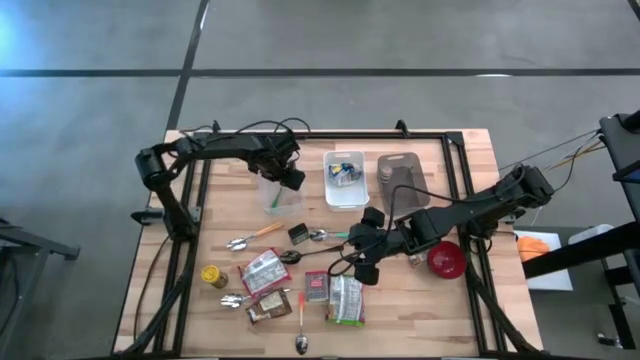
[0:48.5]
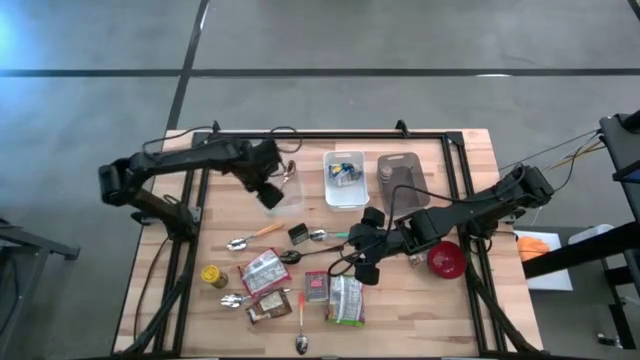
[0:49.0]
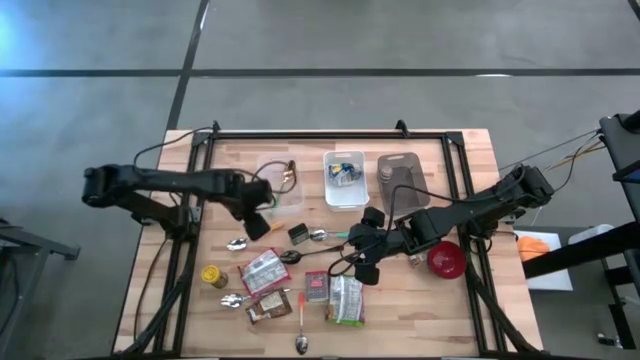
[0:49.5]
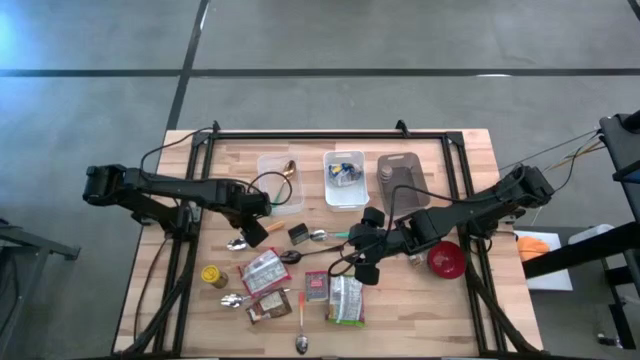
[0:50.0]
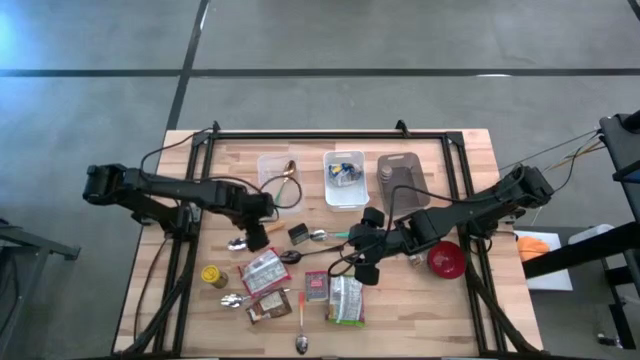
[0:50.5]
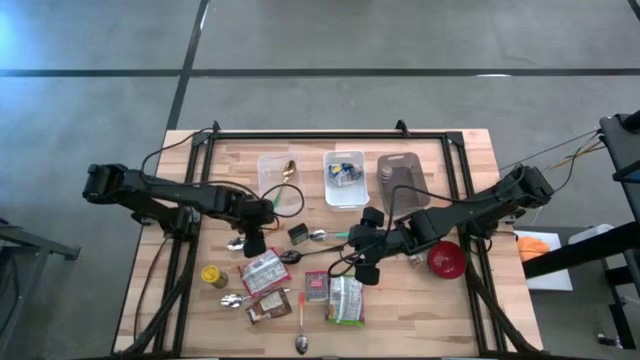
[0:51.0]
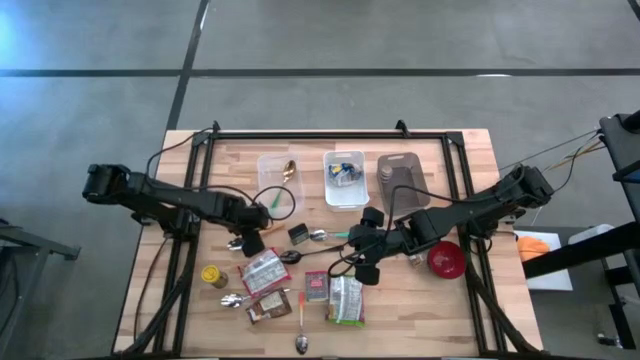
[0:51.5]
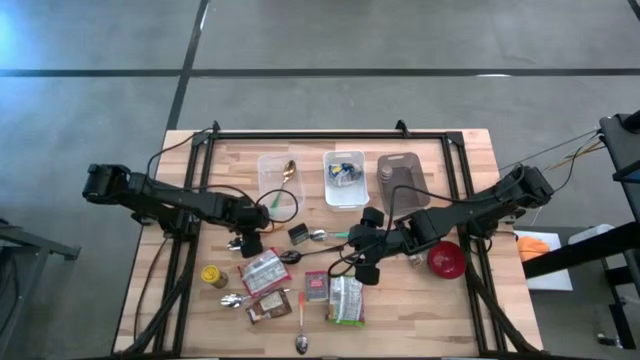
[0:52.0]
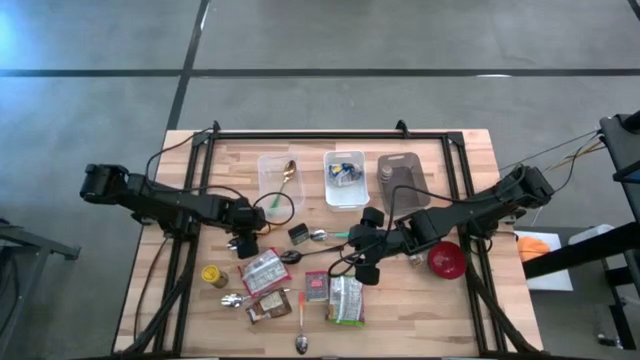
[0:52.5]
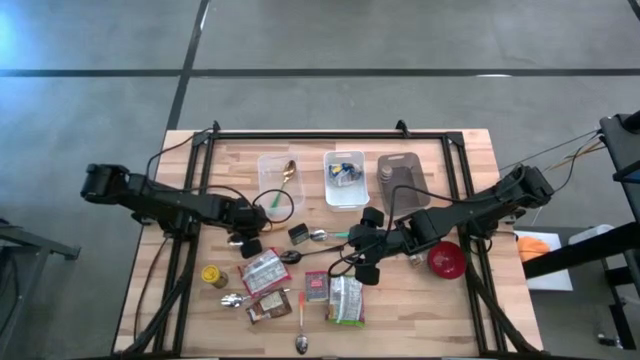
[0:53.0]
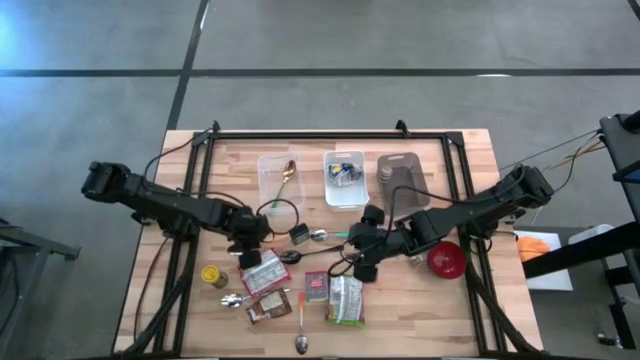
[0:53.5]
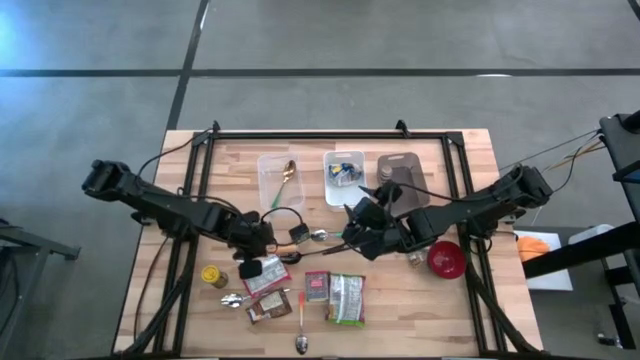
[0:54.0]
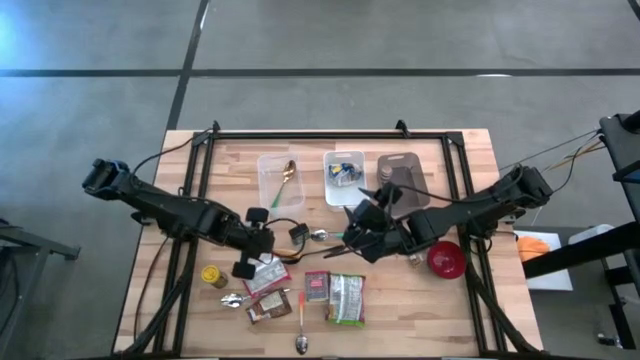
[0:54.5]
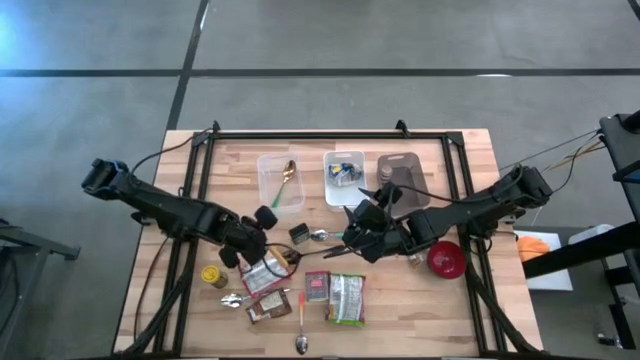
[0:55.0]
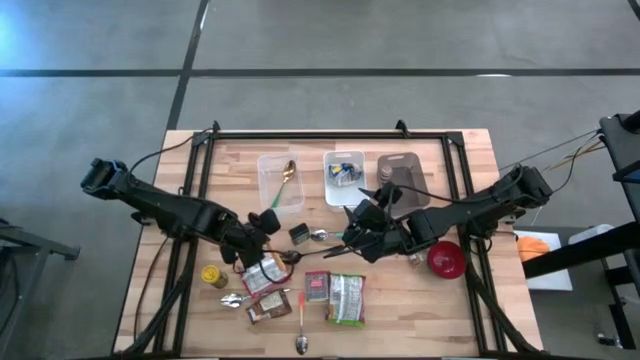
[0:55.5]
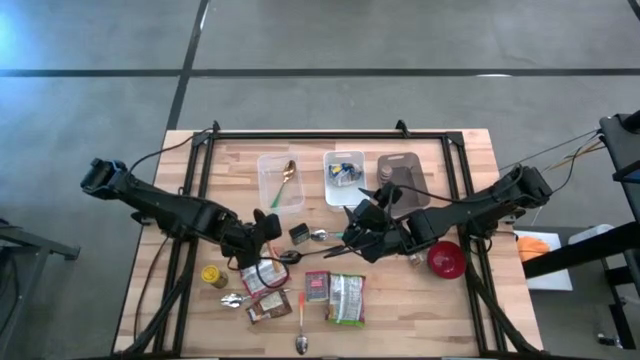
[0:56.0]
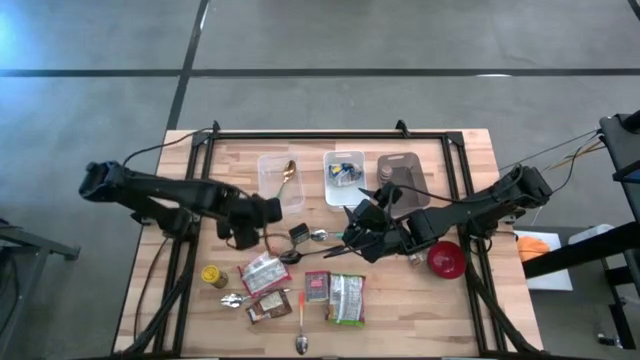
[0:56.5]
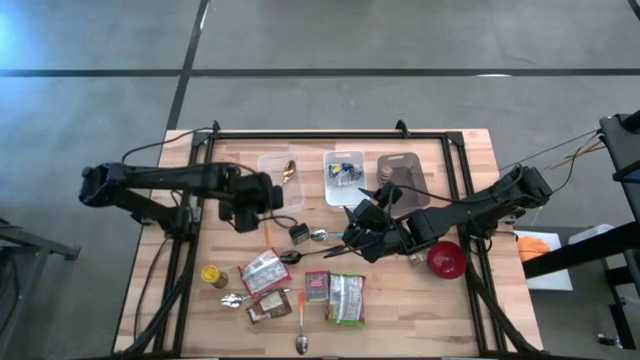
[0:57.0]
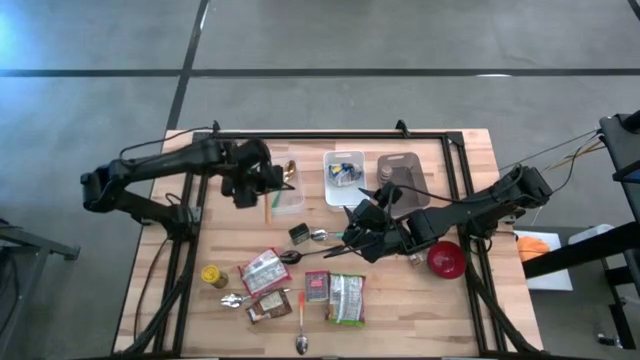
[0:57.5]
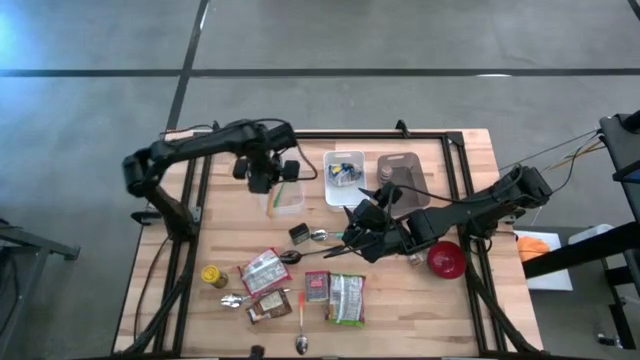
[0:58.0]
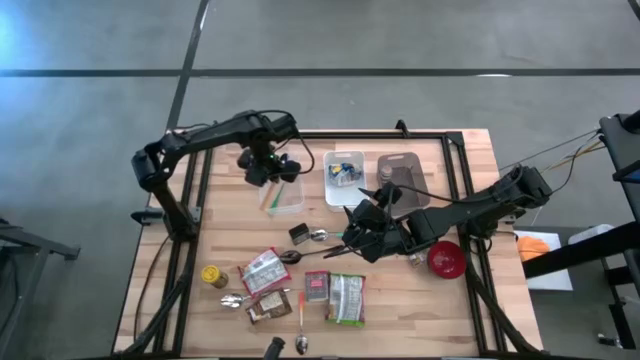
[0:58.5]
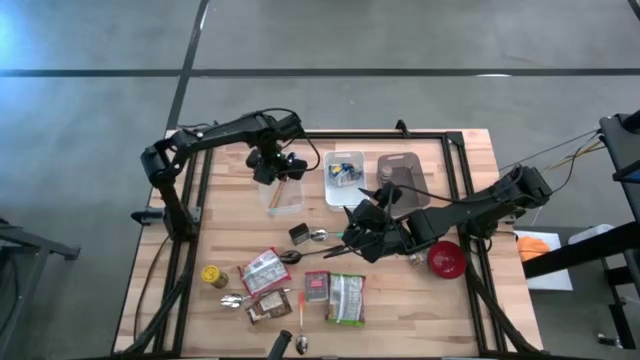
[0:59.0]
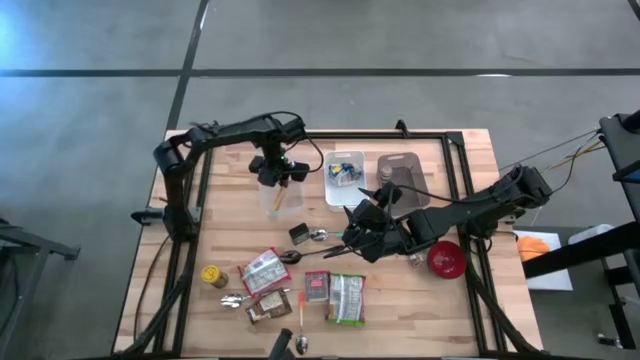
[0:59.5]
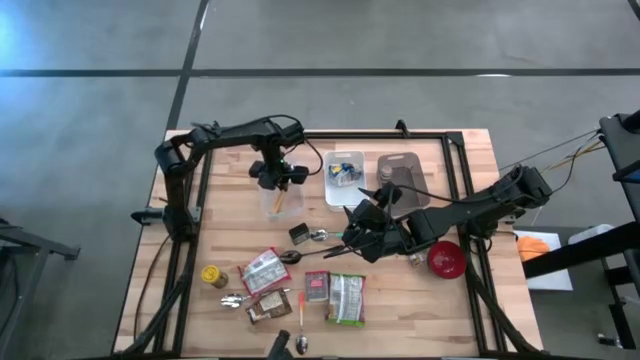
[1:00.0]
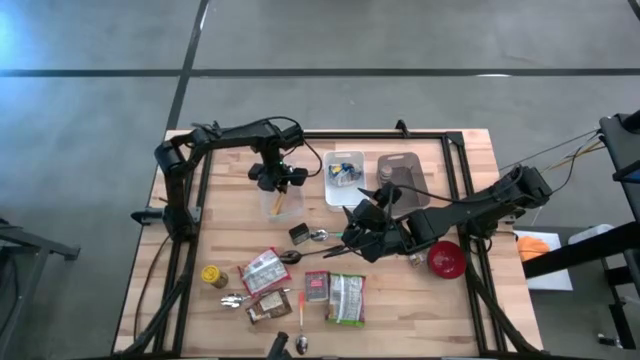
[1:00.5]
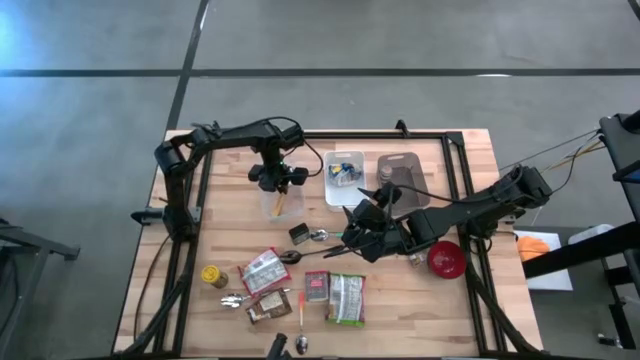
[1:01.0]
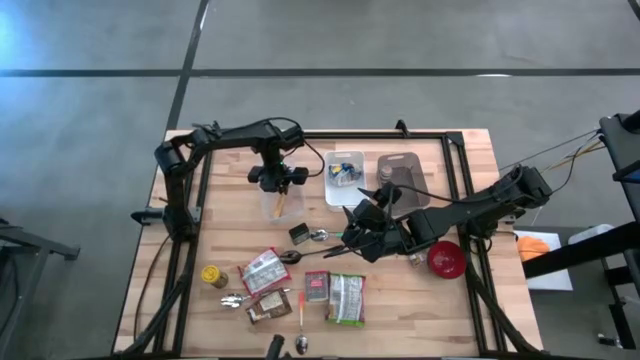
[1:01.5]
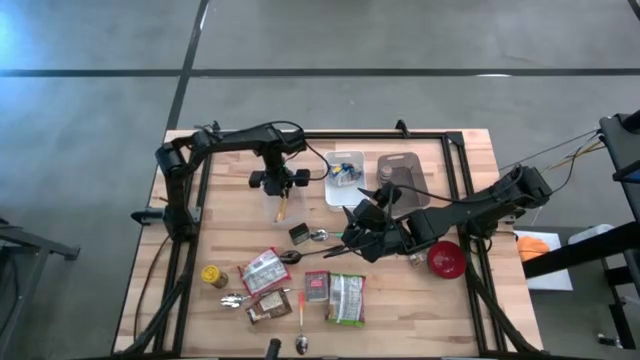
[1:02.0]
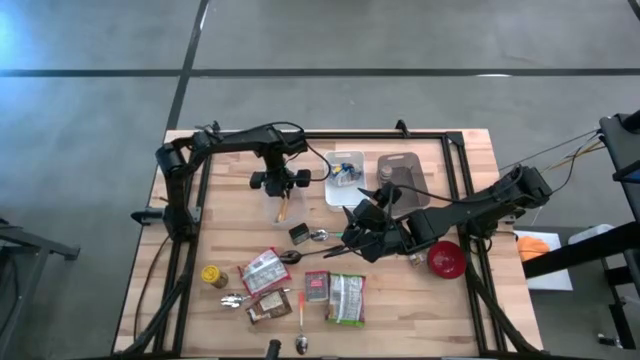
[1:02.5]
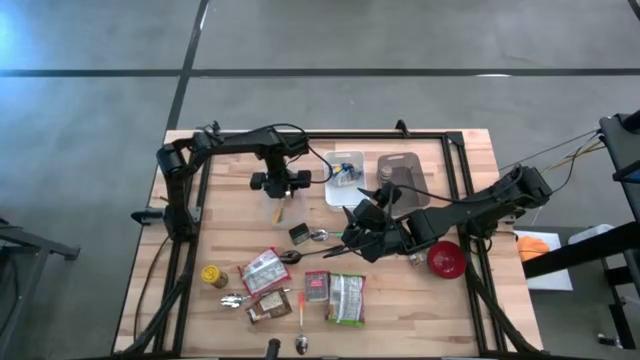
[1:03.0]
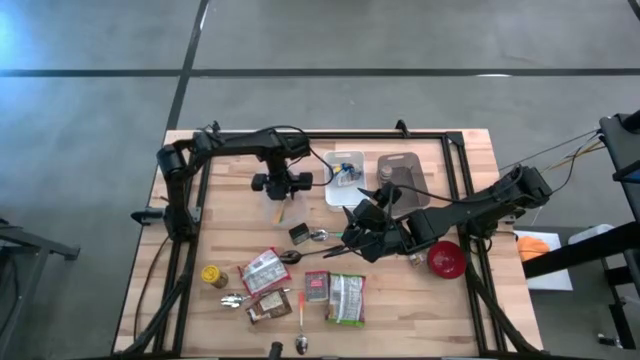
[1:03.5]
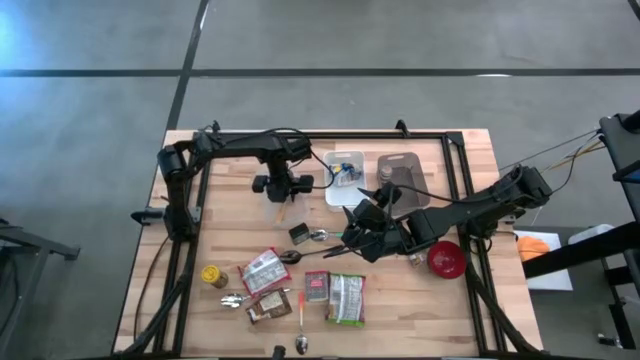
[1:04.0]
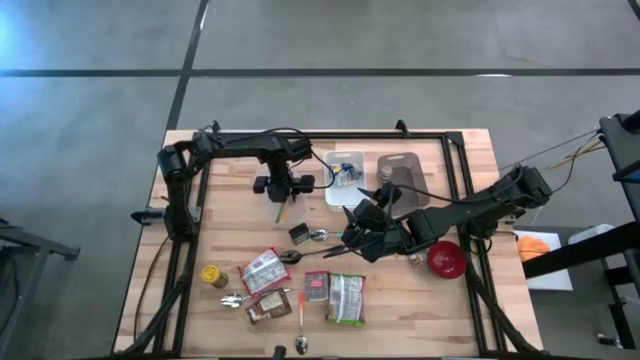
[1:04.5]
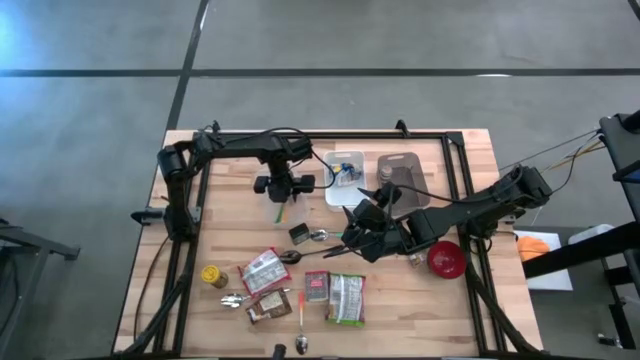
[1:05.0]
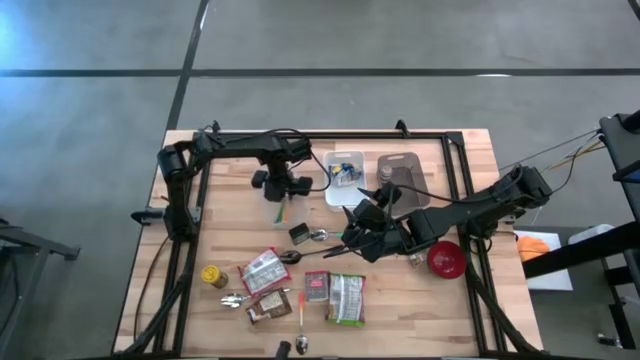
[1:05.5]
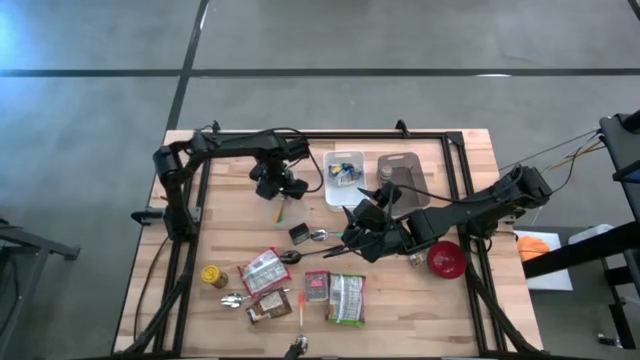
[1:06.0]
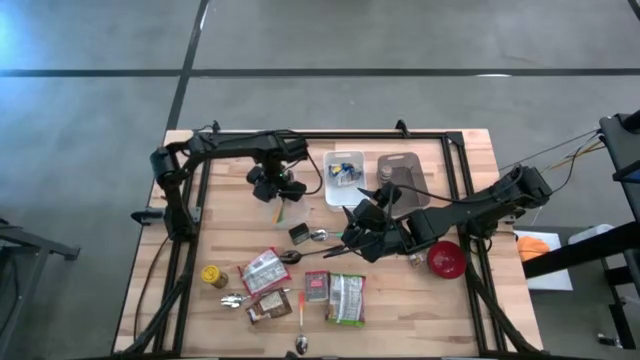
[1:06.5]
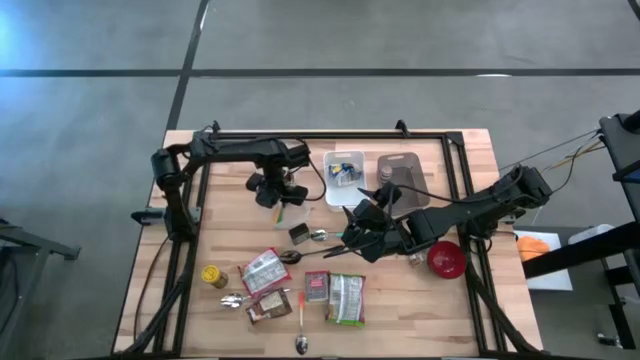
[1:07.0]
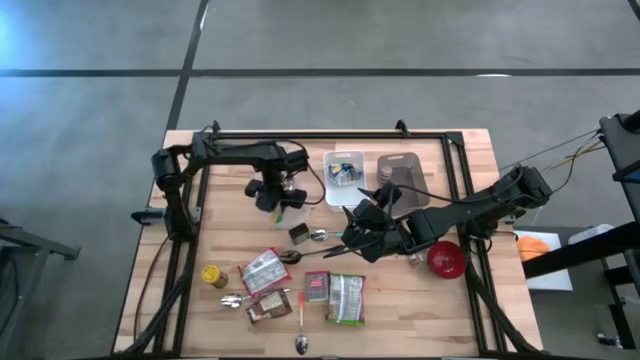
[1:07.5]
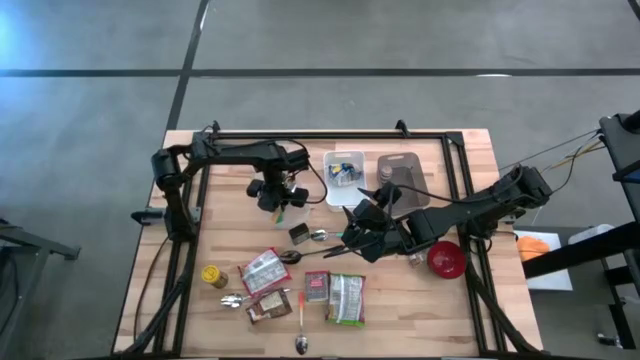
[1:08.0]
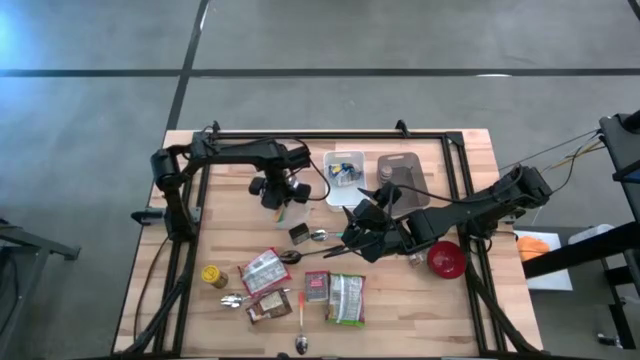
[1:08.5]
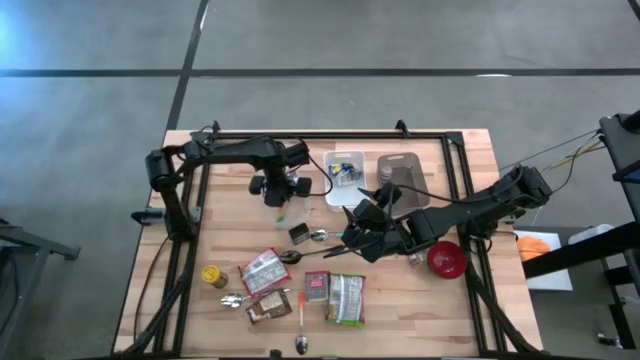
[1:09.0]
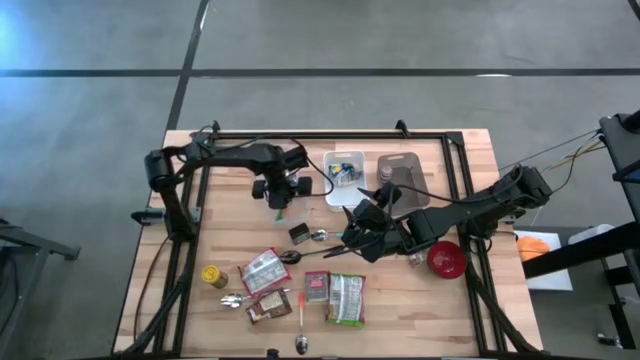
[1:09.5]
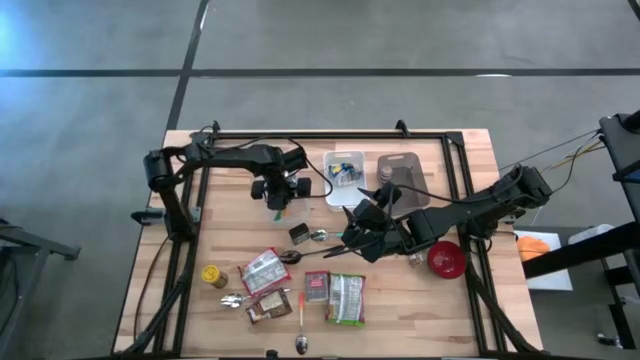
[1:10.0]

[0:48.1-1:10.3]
Put the yellow spoon into the transparent bin
